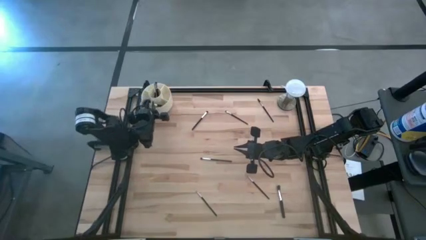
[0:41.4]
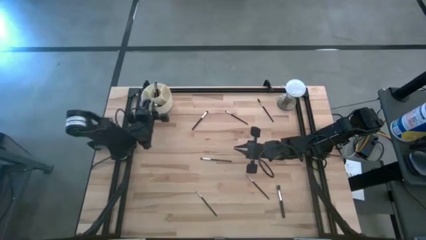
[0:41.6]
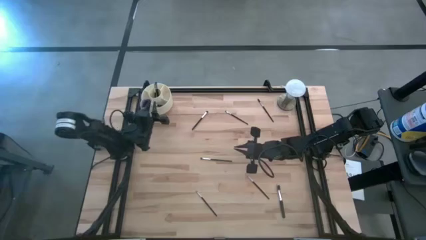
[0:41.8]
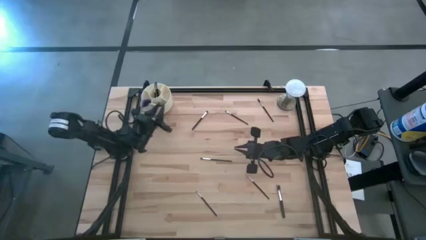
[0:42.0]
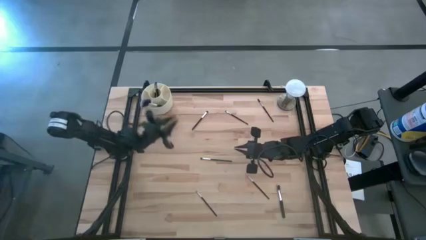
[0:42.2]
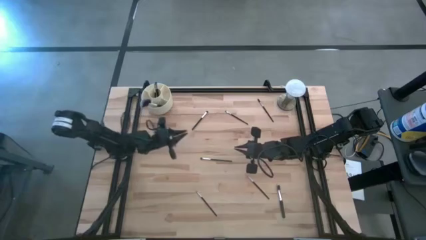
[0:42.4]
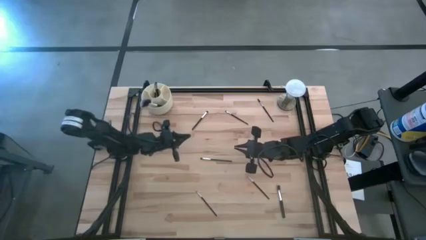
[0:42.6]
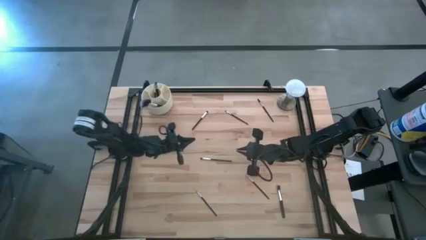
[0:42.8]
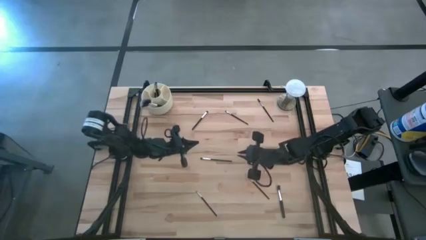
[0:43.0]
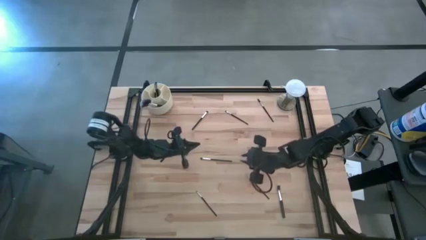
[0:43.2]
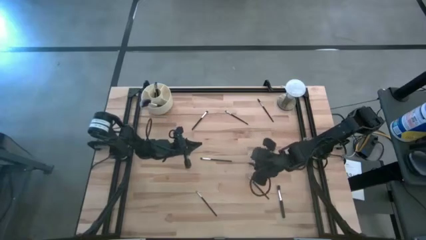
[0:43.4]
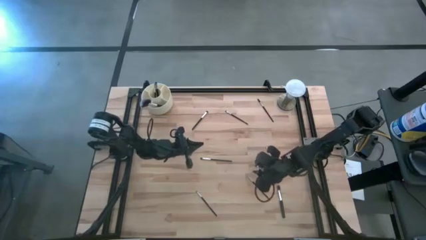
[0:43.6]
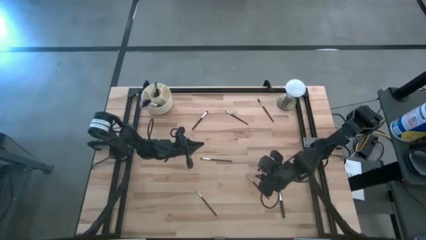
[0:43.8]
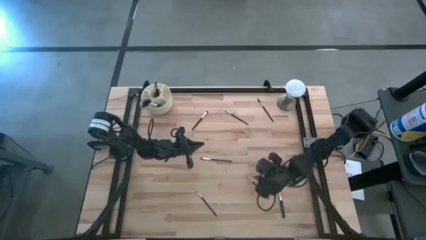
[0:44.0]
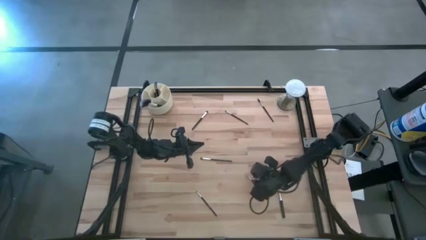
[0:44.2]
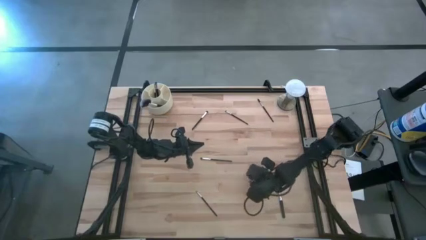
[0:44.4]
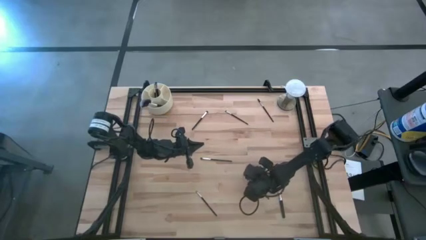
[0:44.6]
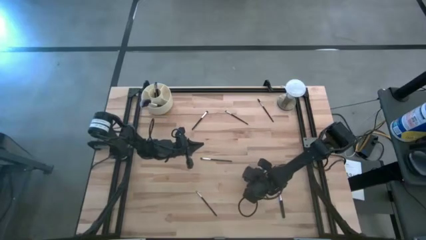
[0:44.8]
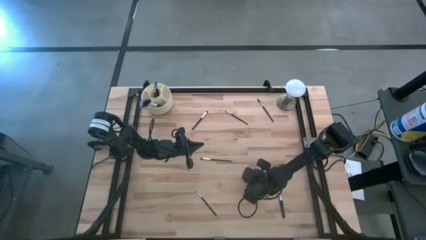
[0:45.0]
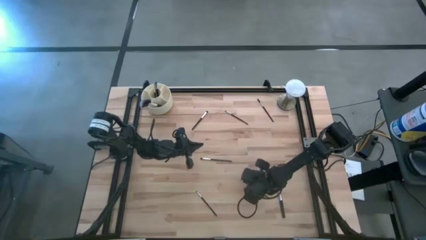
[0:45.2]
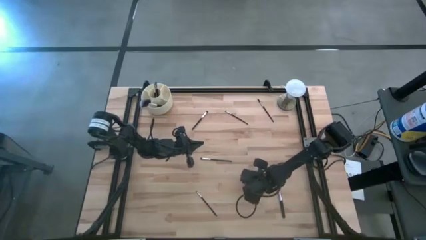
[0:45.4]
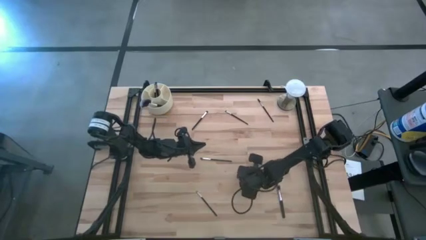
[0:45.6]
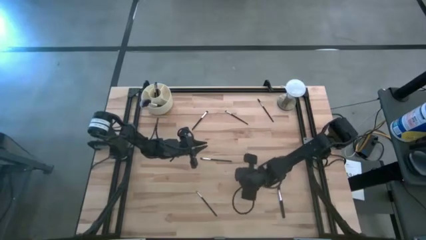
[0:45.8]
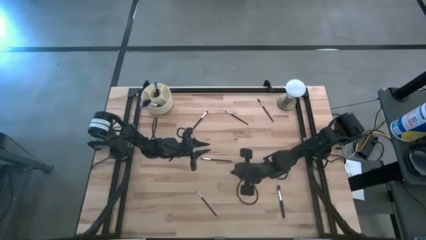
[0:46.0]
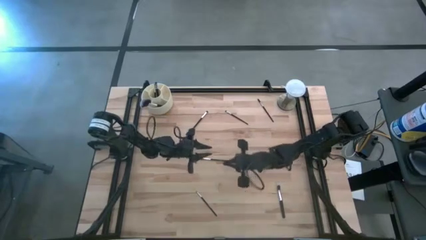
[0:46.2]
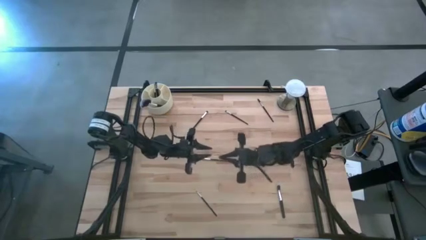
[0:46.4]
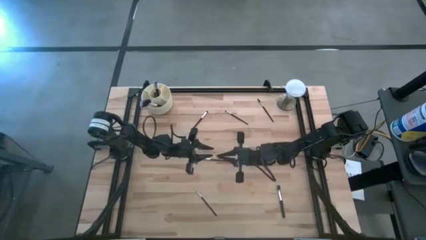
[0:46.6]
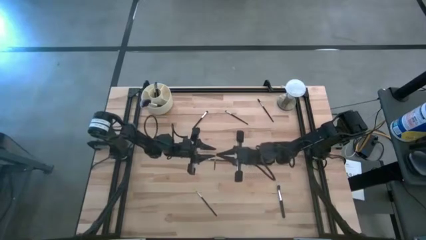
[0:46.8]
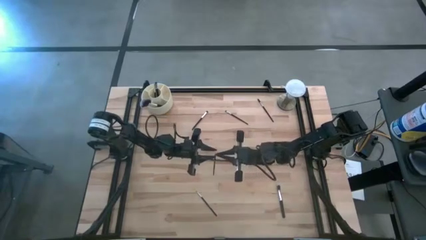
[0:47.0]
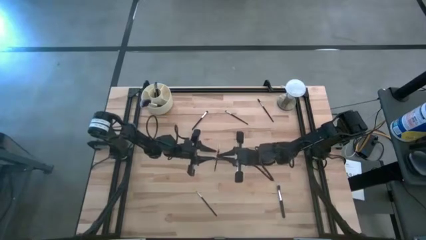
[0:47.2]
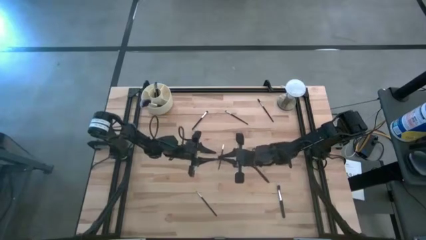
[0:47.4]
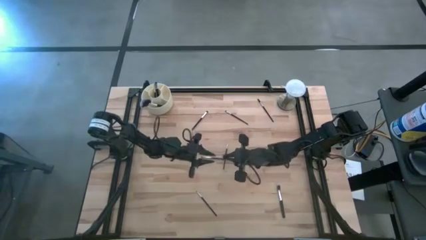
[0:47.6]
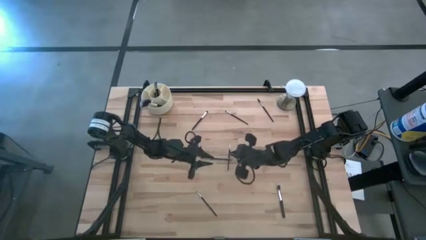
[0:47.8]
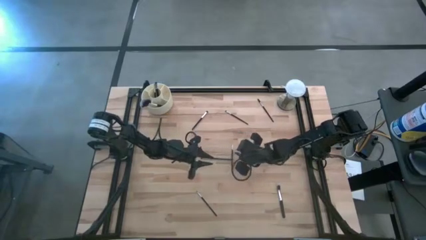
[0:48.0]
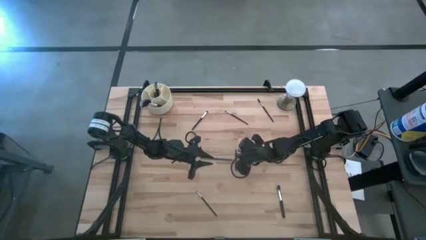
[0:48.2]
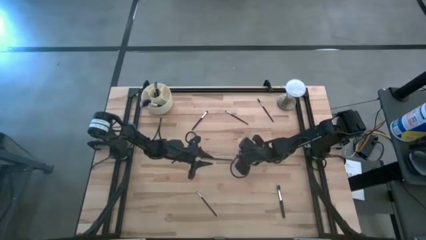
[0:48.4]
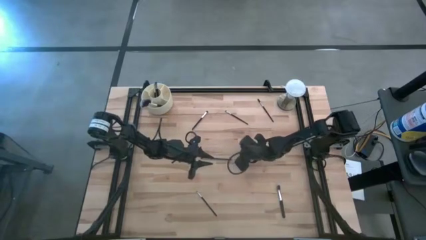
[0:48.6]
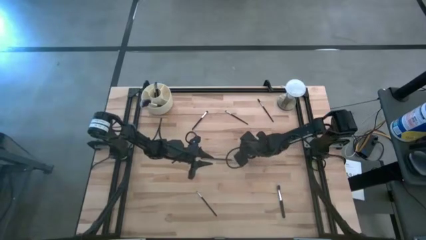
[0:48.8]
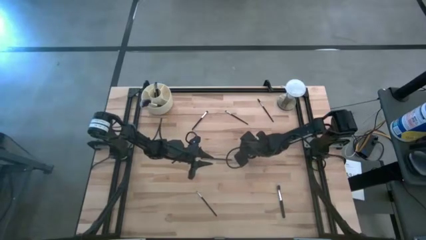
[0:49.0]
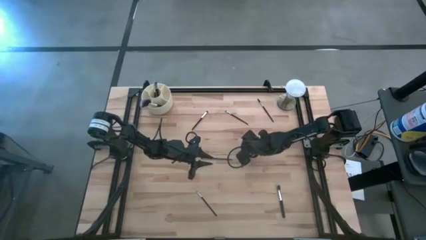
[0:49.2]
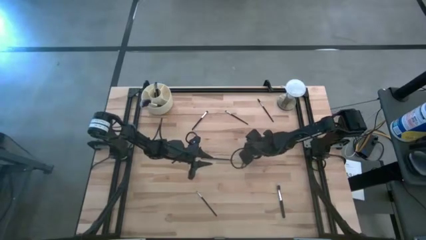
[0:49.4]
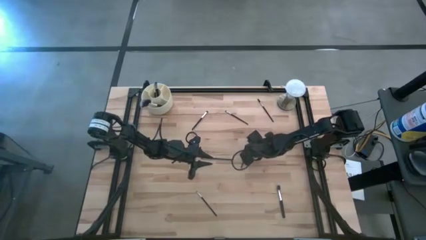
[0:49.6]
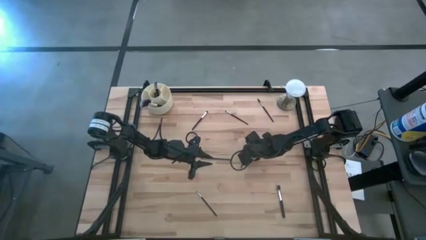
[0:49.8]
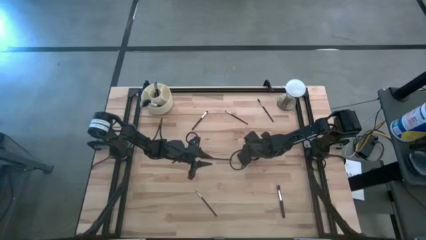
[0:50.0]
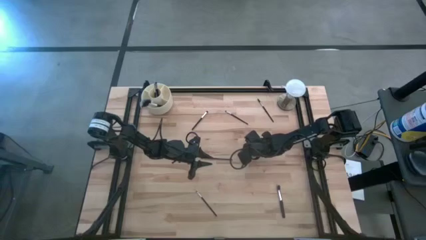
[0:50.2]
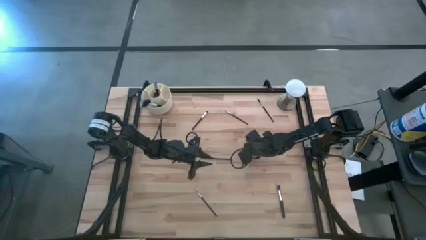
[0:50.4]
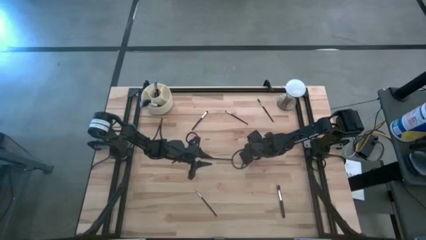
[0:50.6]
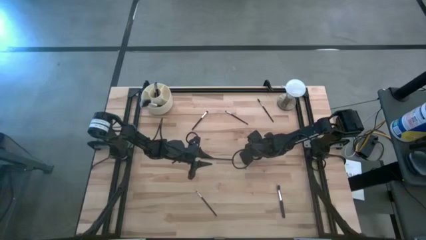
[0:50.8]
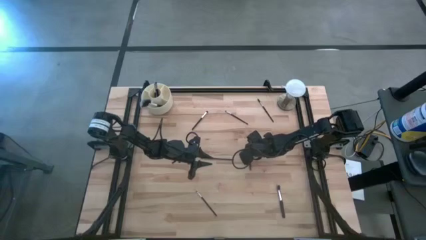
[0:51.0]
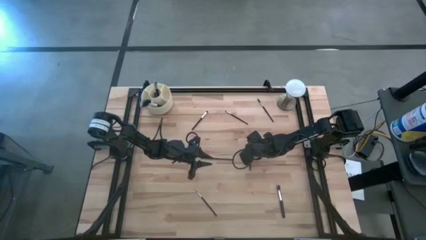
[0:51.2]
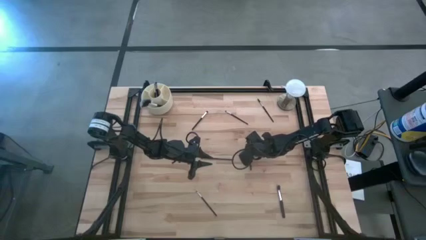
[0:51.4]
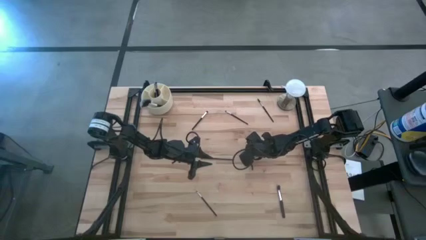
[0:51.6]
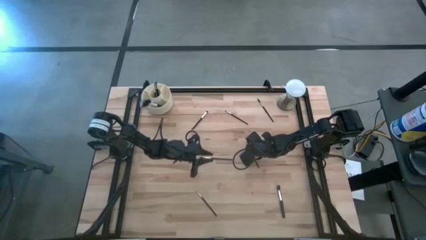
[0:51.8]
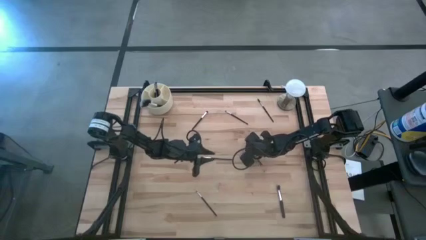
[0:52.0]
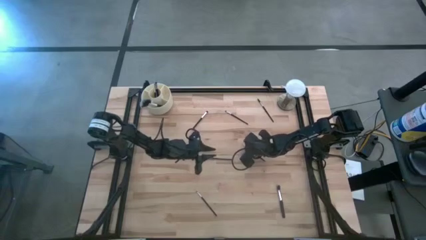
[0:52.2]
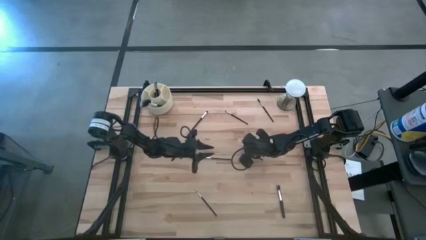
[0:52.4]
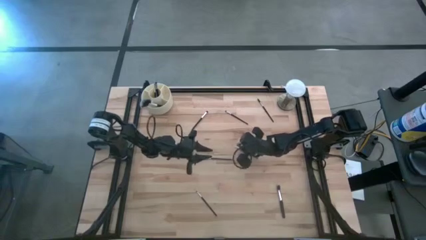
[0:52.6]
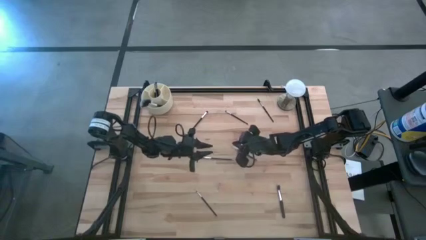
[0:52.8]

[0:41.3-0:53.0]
Task: Put items in baskets/containers
Put the liner brush into the organizer

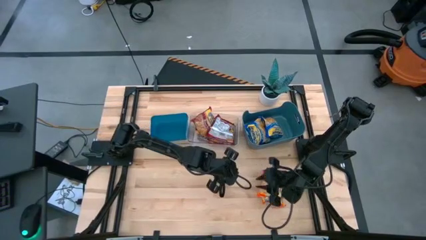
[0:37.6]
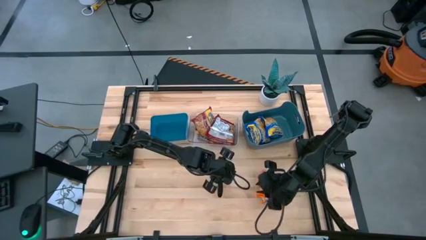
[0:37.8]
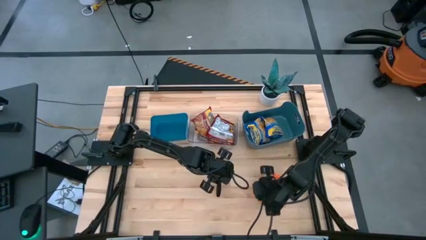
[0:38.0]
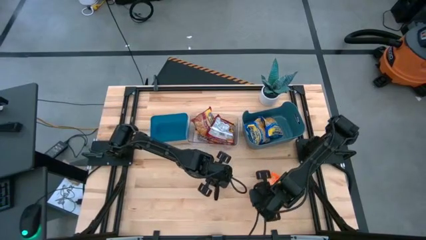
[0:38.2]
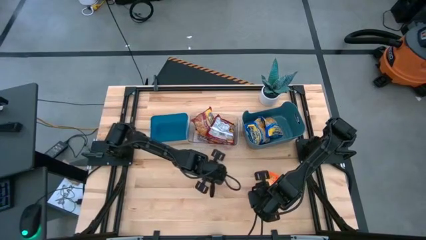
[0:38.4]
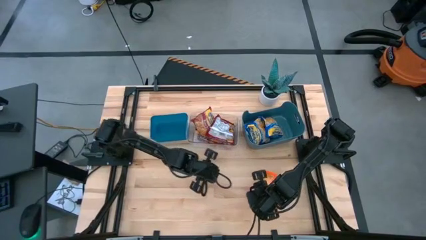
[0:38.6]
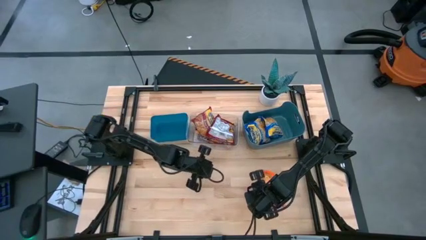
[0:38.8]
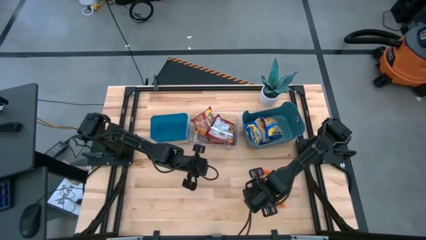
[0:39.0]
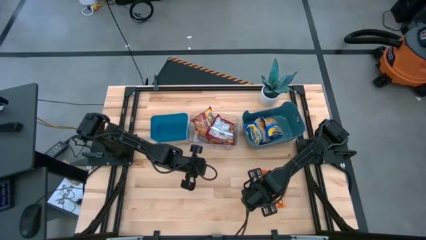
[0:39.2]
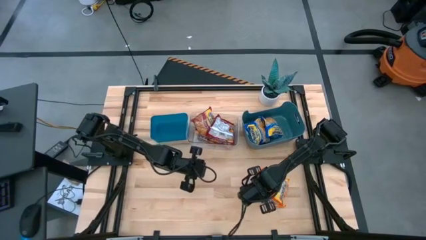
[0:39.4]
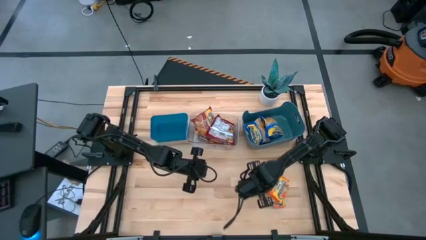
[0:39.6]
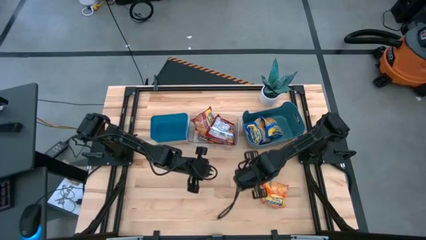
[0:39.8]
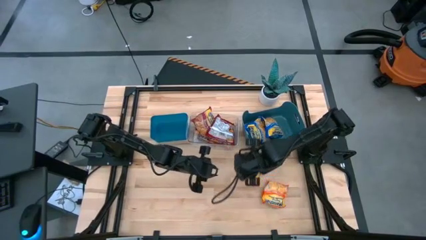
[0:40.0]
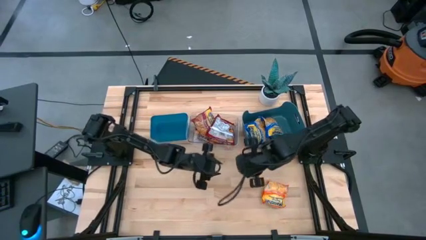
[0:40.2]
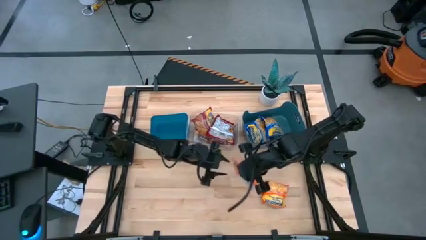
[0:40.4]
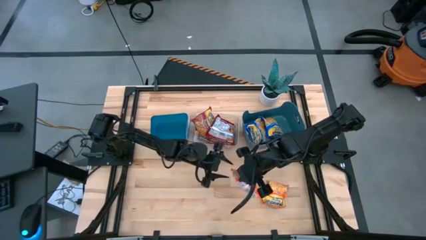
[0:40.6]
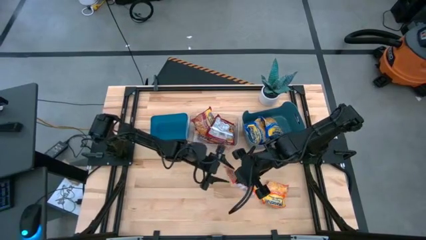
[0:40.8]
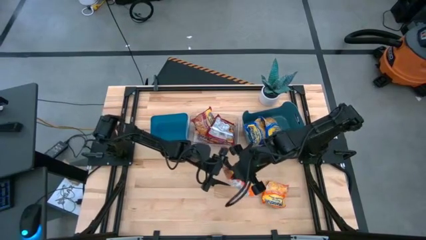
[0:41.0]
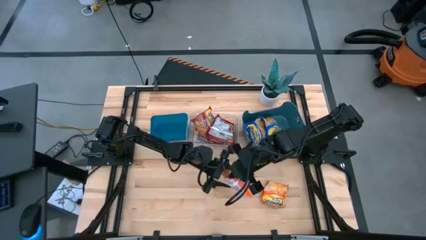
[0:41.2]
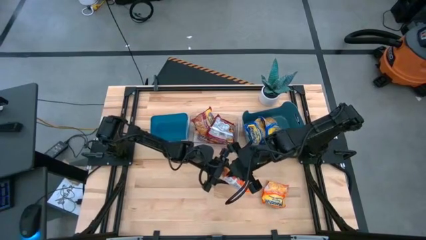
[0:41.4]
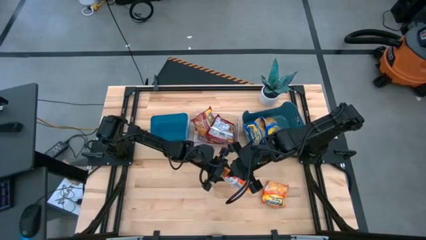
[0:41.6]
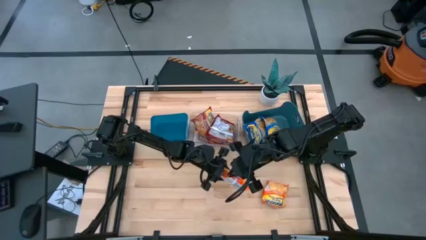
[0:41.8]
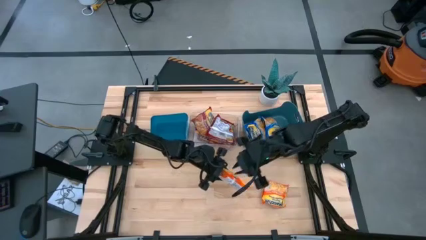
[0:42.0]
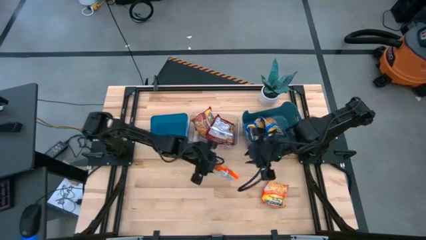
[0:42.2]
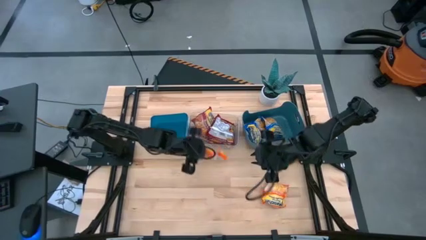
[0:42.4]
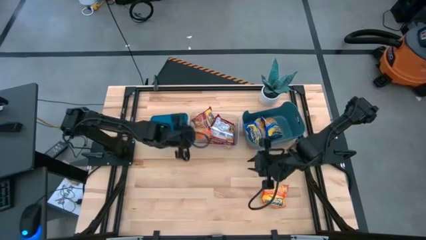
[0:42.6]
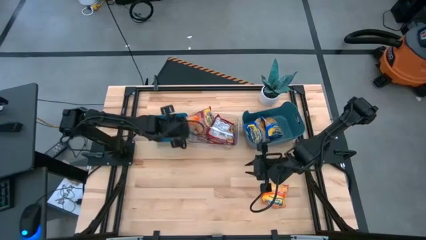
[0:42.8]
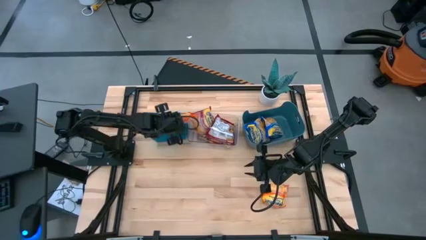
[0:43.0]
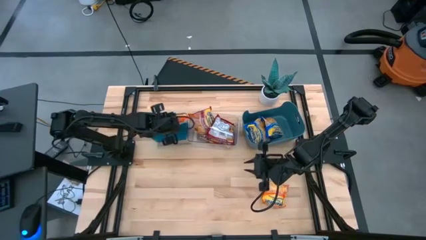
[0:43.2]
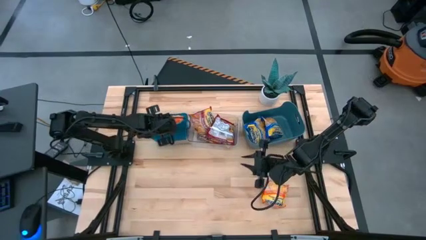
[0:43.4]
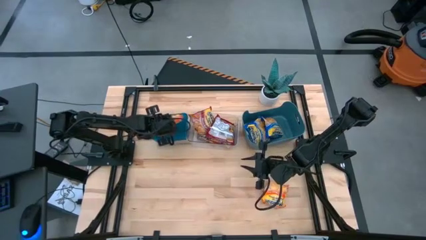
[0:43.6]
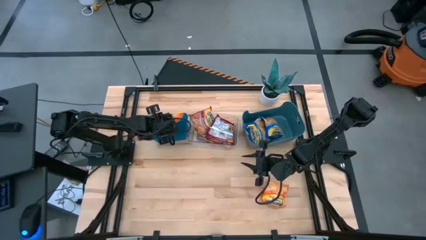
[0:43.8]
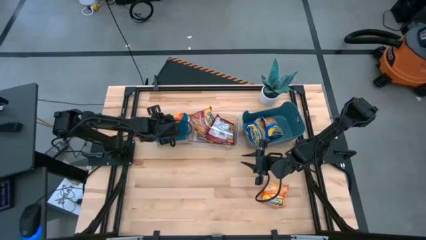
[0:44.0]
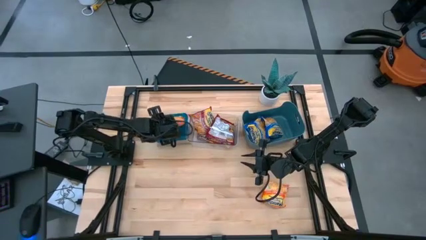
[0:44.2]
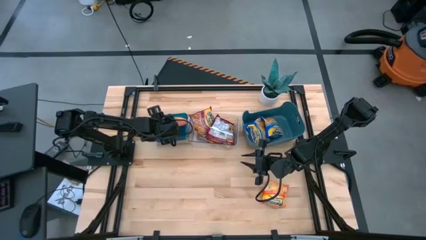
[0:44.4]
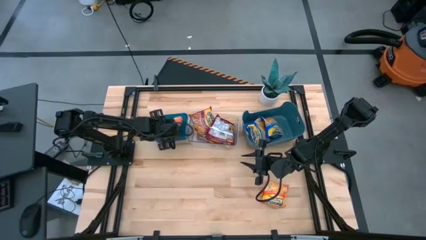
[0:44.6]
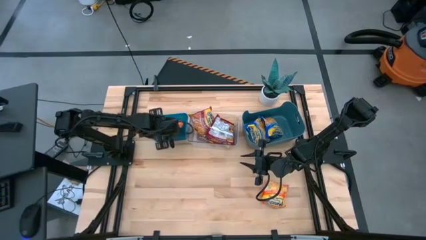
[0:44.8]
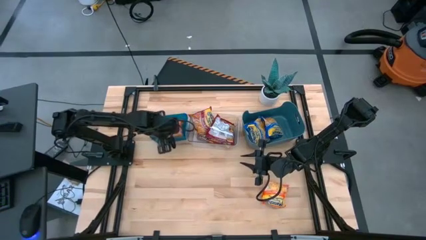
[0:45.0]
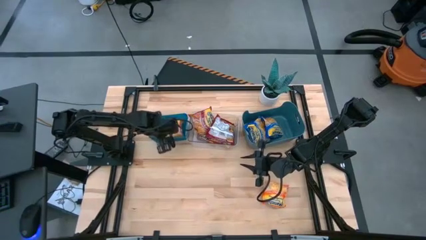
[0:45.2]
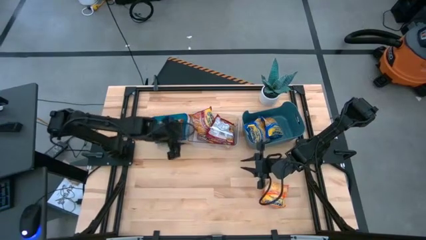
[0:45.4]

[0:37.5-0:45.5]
Task: Sort Maruchan noodles
Put the orange noodle pack into the left blue bin
